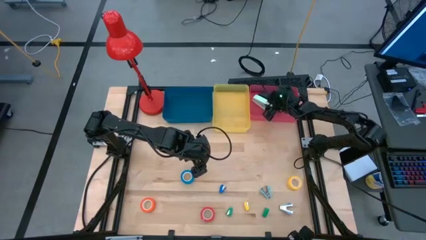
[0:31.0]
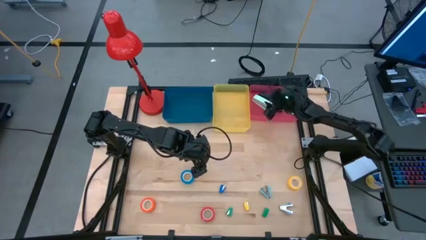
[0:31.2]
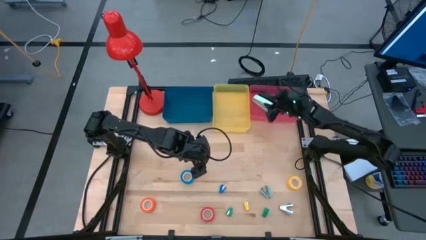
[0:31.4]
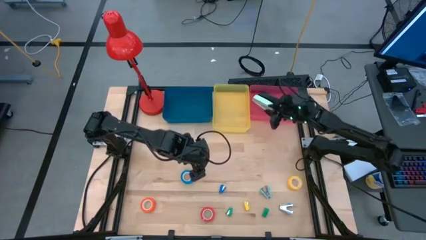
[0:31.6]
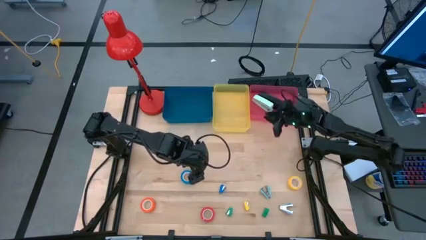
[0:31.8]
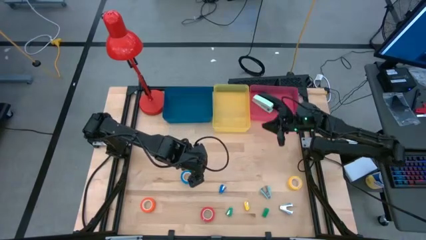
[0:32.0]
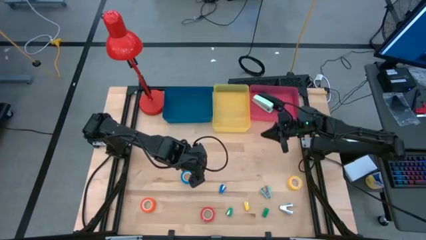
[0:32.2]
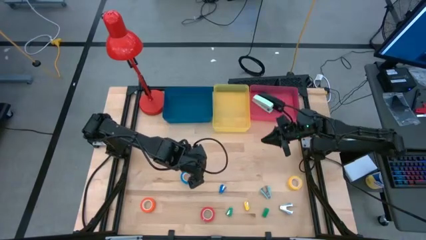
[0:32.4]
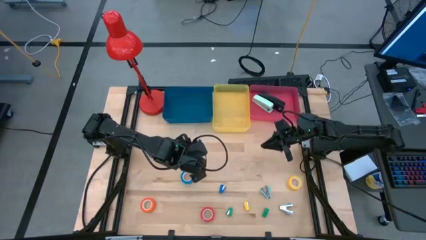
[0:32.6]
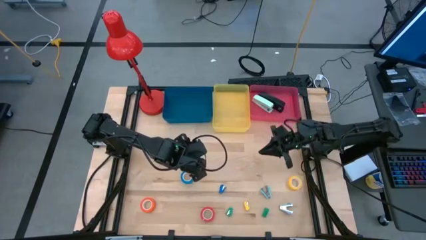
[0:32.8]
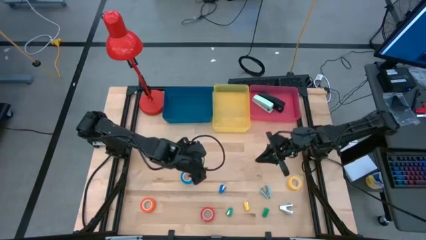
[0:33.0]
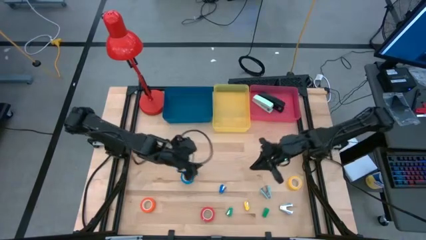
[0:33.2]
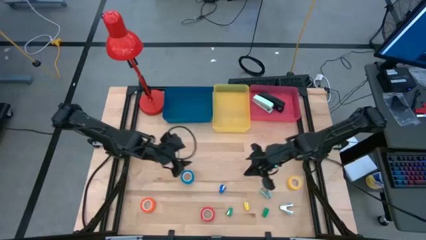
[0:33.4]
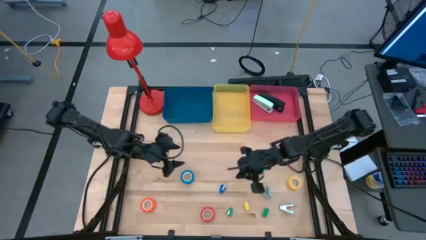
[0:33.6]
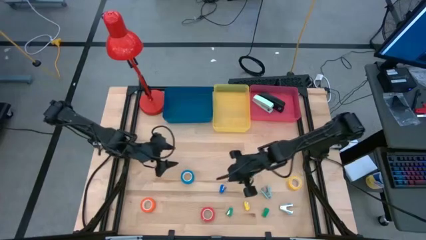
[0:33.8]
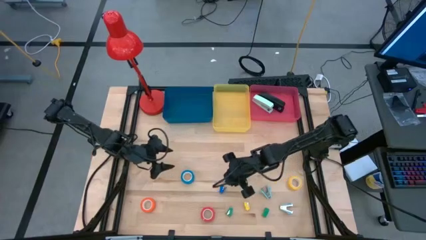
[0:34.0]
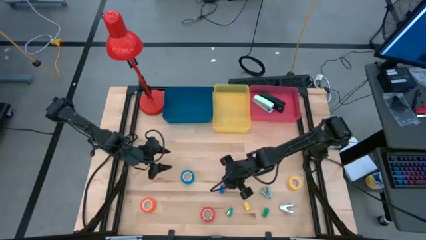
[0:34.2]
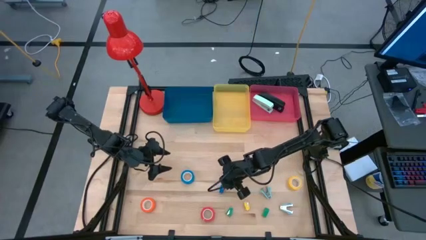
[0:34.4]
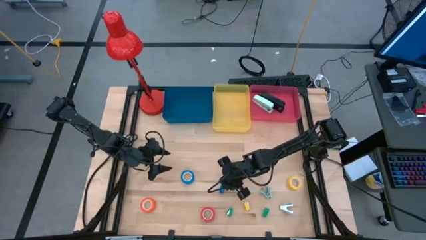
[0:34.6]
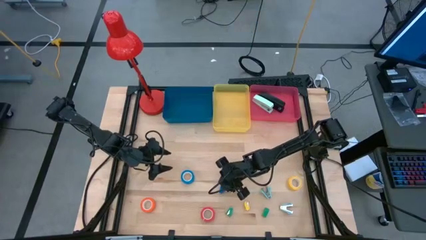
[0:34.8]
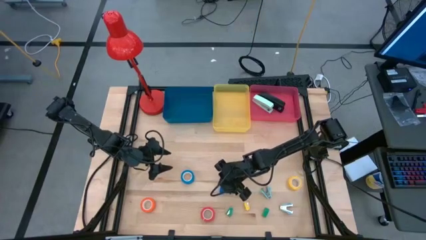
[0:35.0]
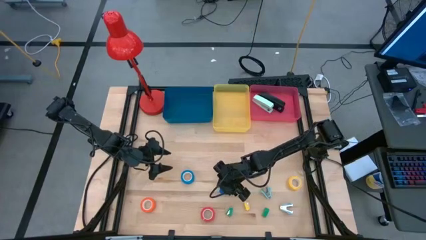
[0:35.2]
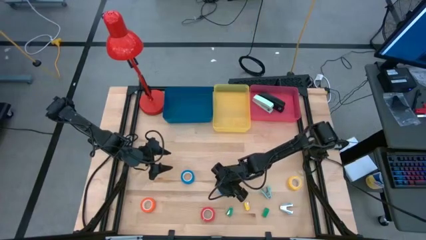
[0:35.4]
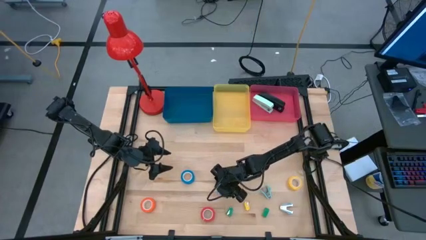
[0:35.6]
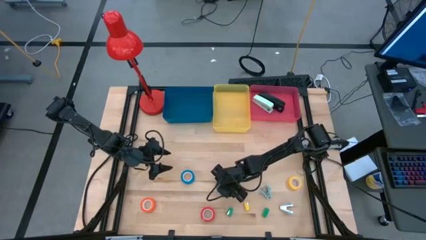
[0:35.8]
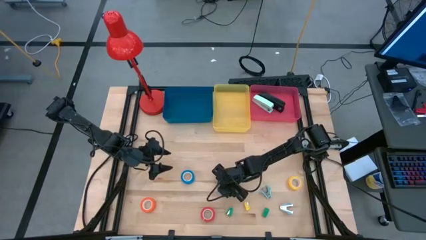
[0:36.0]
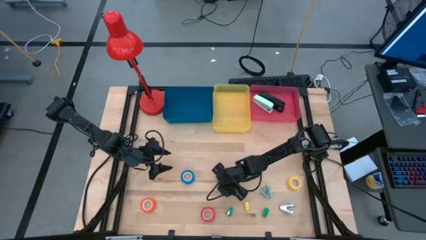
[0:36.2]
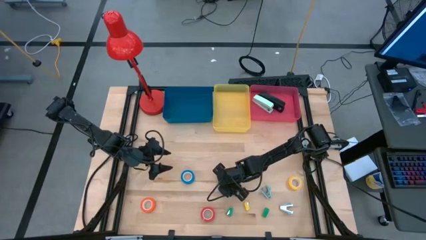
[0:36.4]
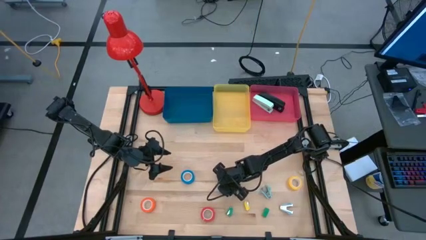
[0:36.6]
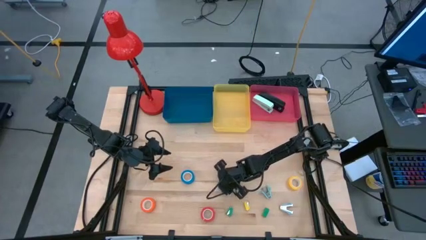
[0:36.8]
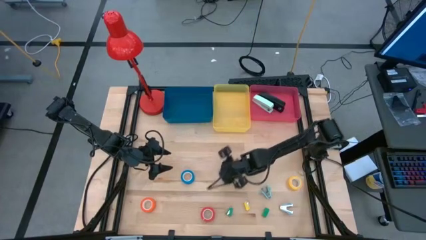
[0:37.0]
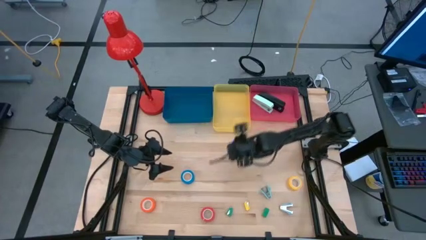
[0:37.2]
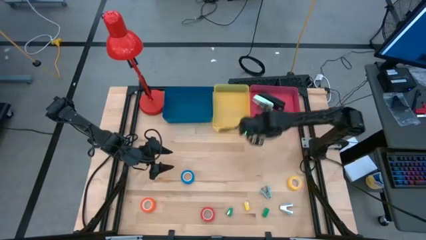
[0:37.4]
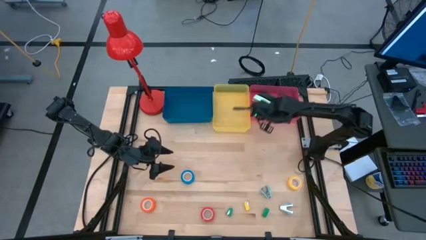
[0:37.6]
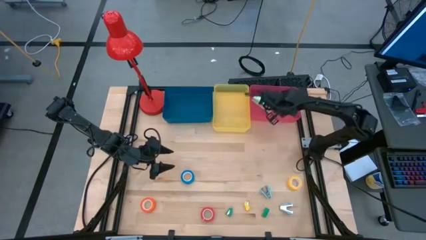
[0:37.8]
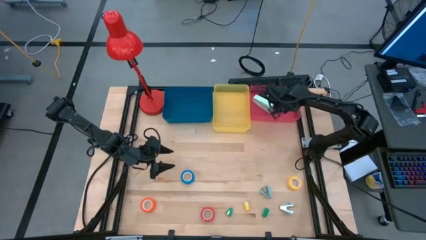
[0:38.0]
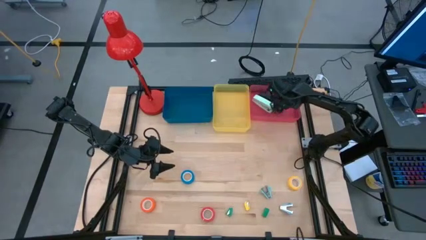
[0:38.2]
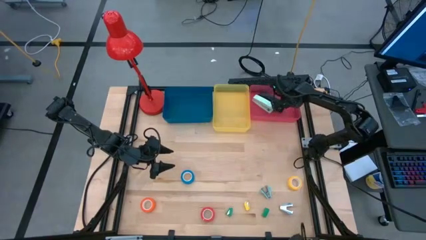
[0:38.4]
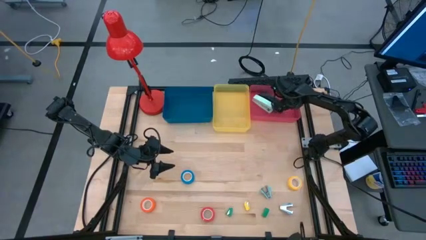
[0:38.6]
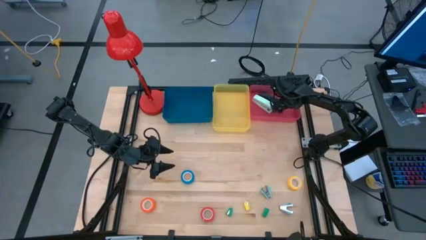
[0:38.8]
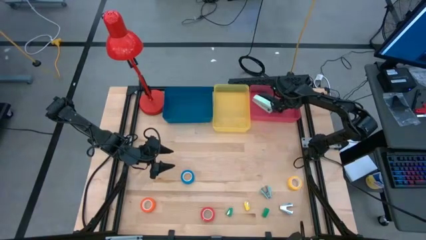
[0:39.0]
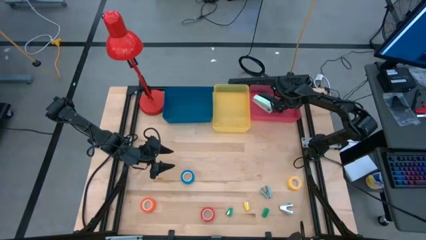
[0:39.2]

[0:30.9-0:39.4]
Task: Pick and place Stapler, Stapler remover, tape
Put the blue stapler into the pink bin

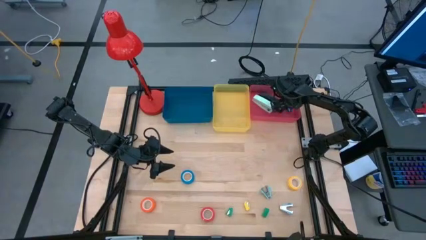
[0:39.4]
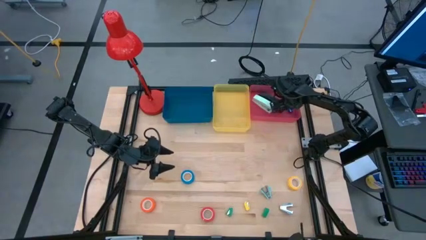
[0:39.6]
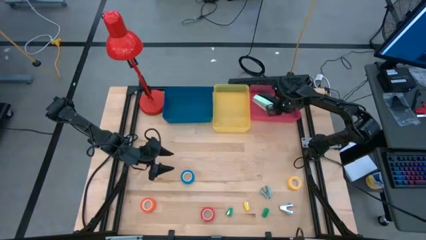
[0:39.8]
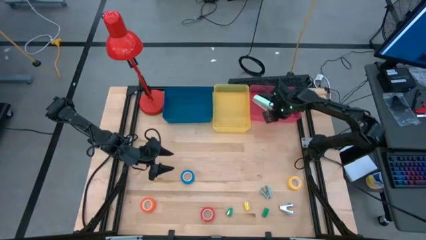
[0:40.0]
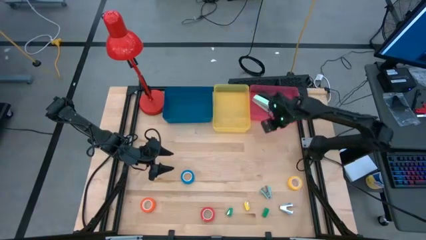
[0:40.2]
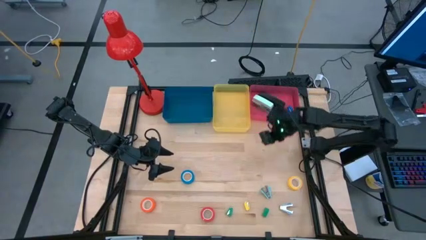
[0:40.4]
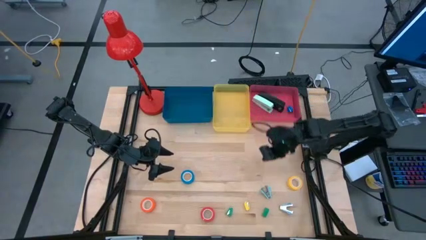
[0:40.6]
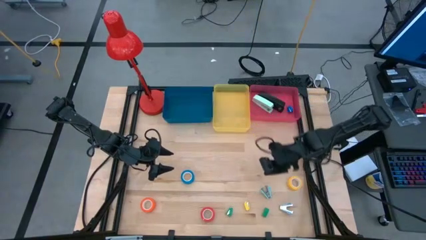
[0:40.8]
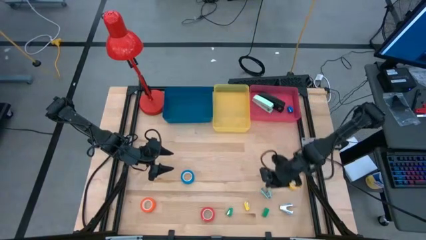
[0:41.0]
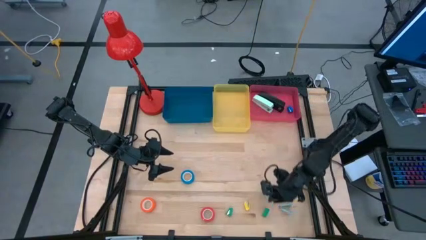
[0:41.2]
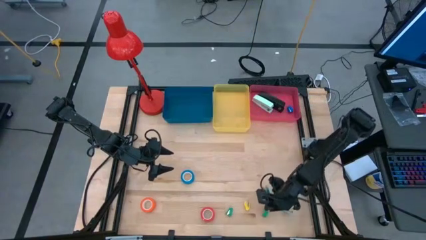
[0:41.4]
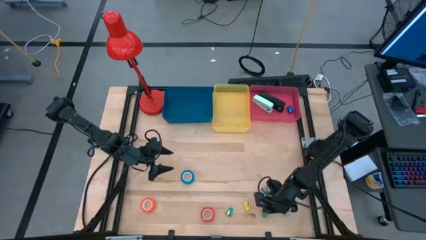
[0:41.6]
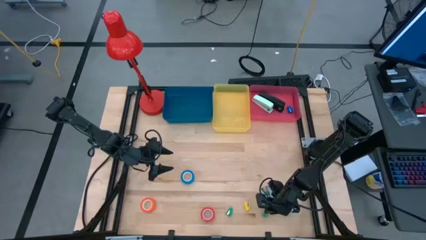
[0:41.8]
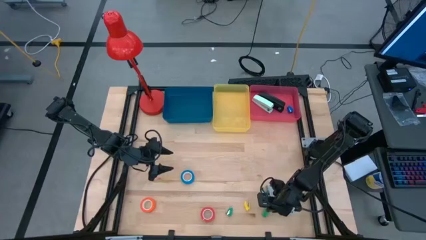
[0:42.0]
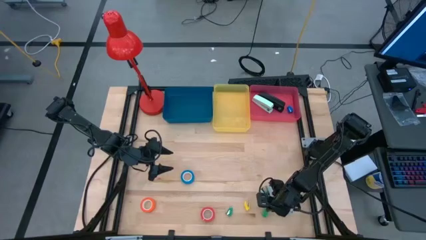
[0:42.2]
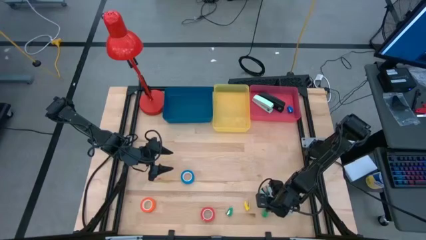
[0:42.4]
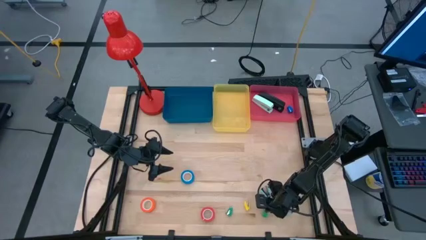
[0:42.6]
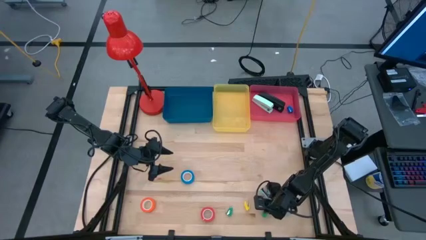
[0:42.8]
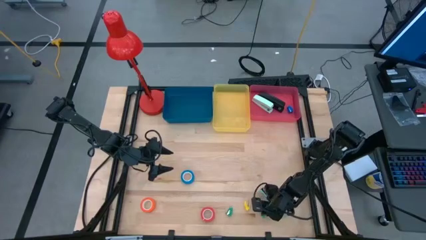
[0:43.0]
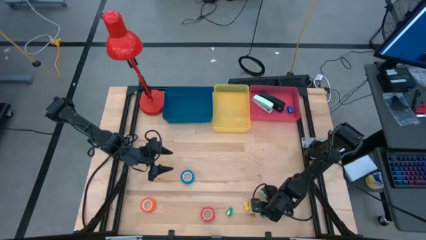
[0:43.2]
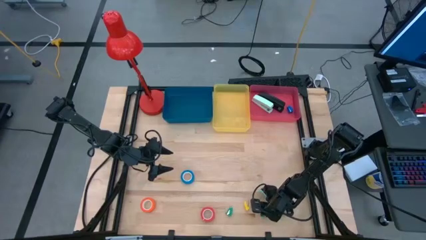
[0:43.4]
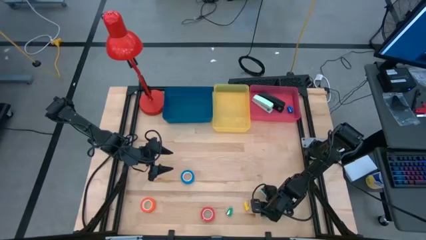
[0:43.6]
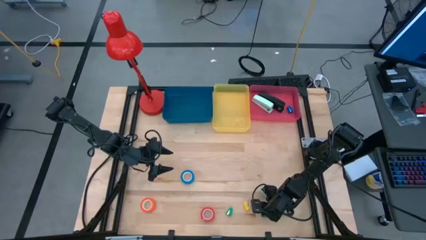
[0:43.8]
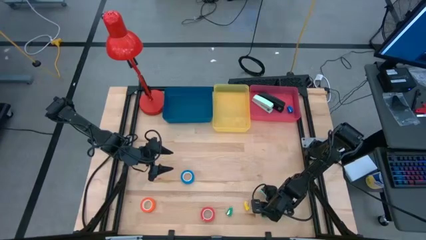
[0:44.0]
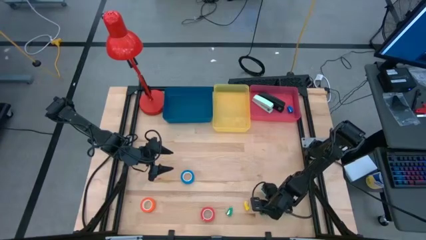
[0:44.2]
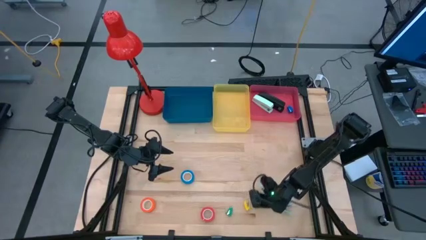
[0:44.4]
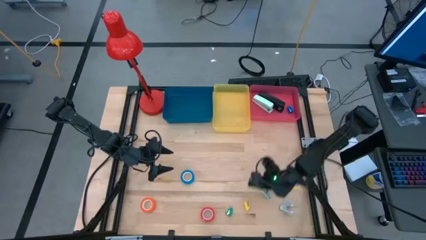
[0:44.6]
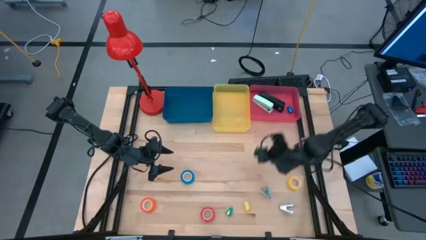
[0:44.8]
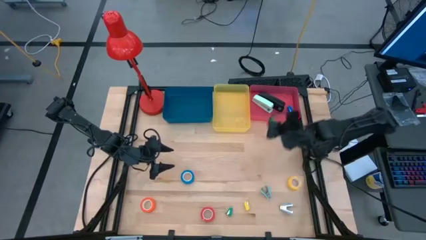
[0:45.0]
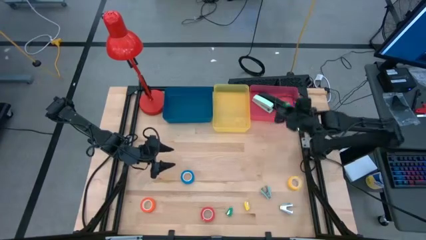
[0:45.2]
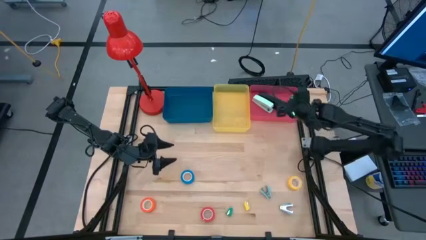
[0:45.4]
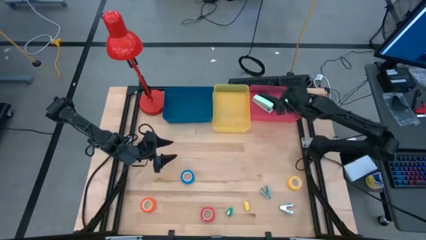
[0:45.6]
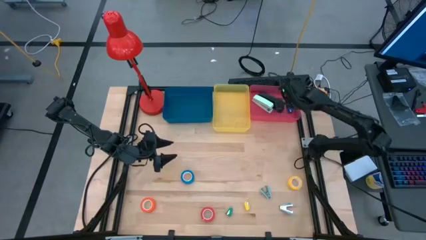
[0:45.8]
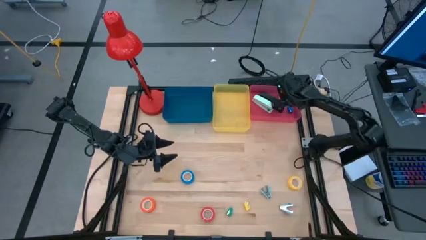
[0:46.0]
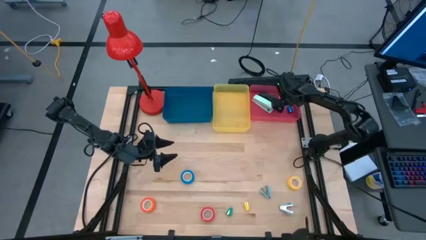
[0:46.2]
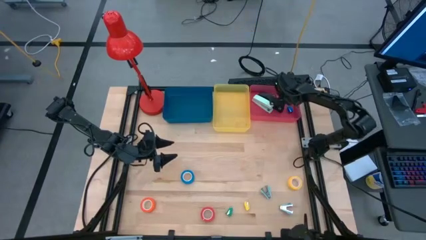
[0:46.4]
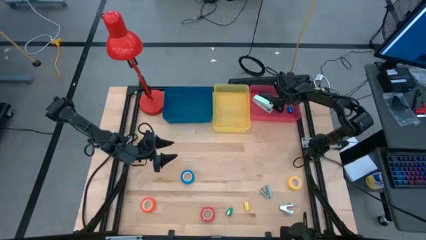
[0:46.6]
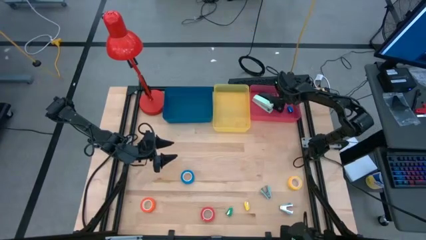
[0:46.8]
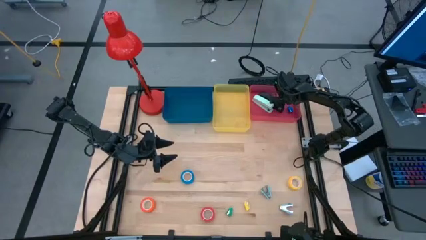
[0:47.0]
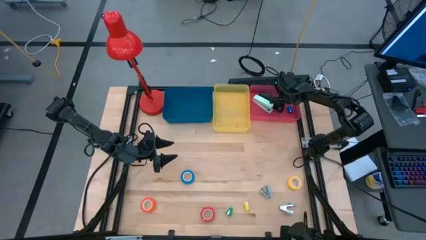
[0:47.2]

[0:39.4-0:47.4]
Put the right green stapler into the pink bin
